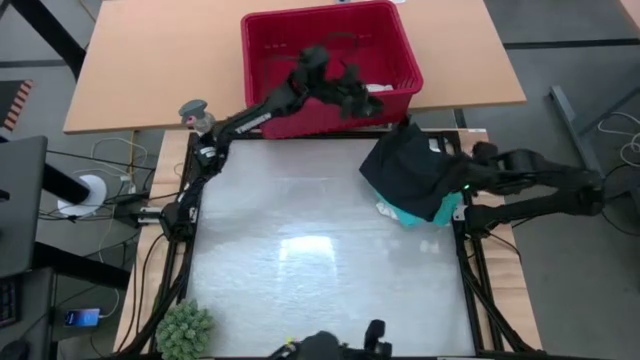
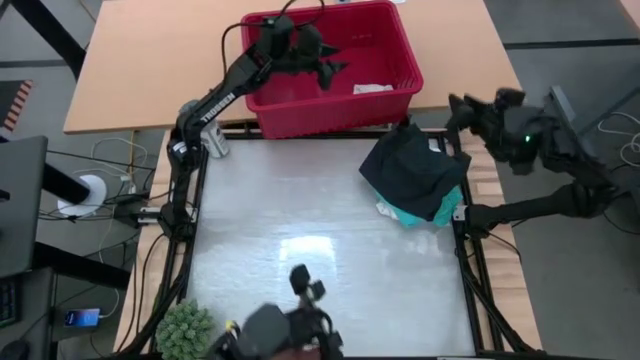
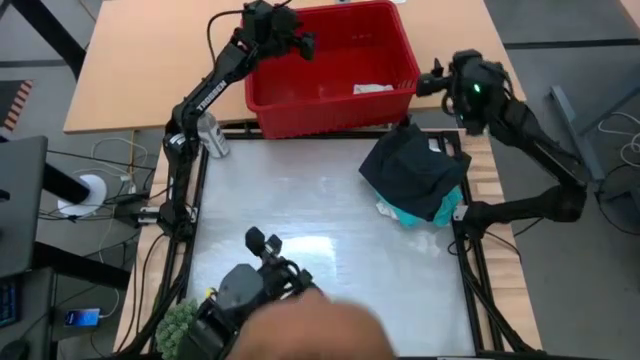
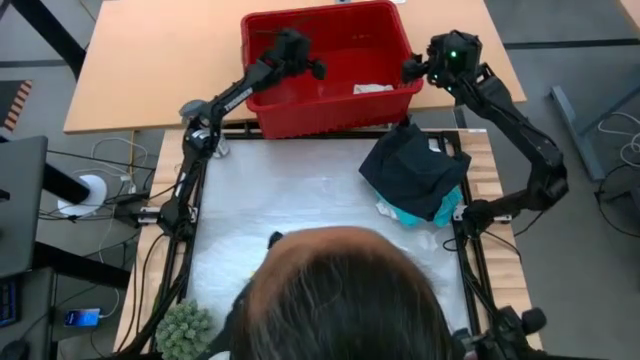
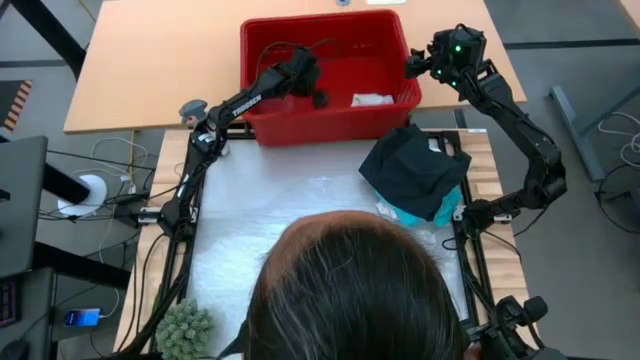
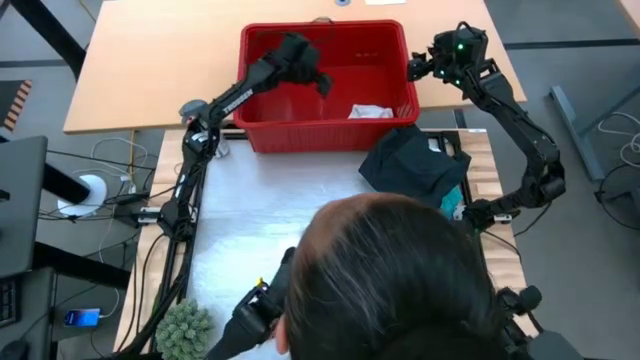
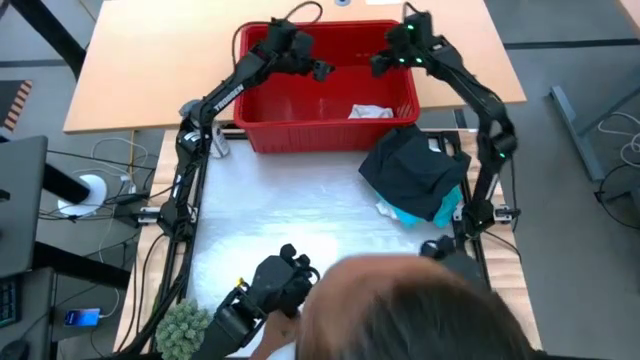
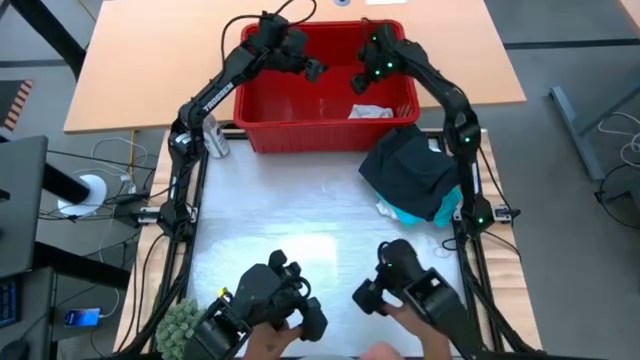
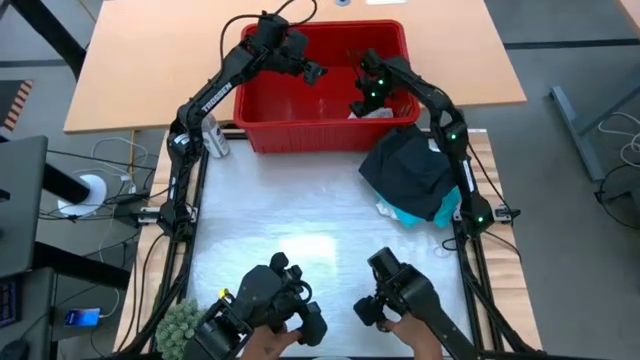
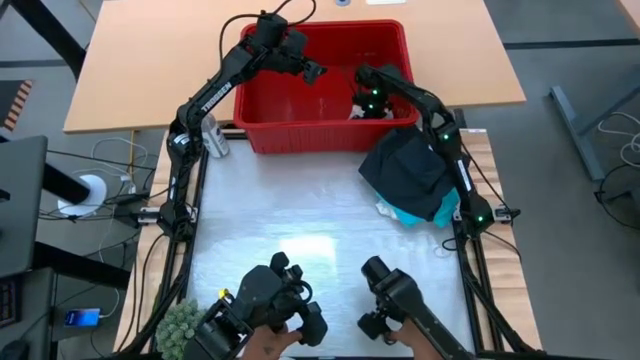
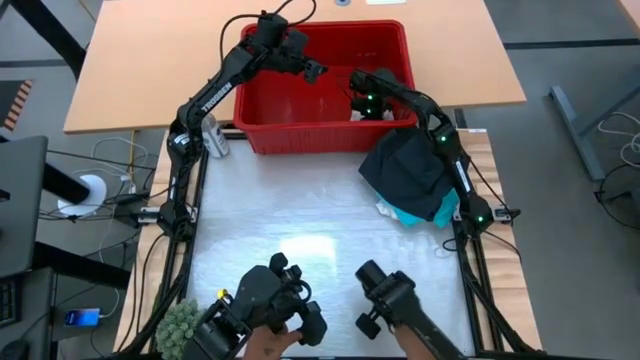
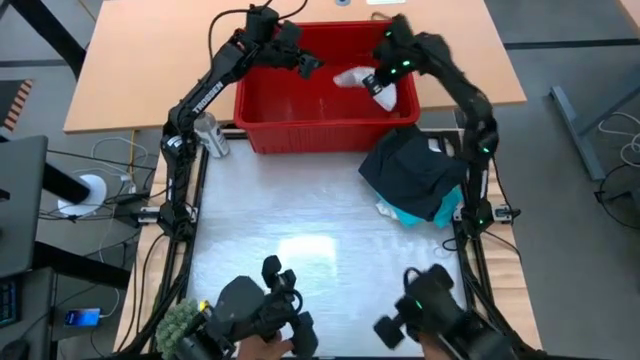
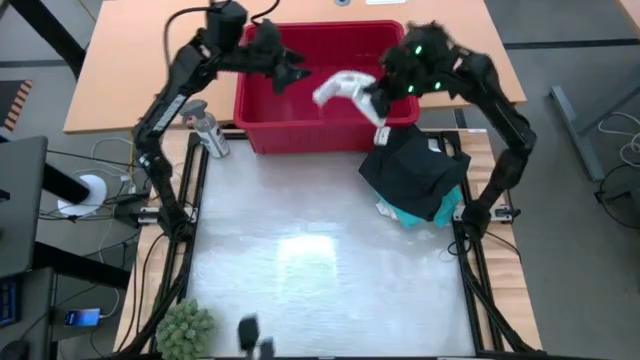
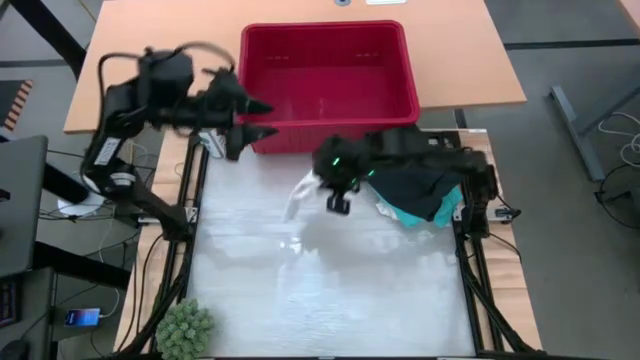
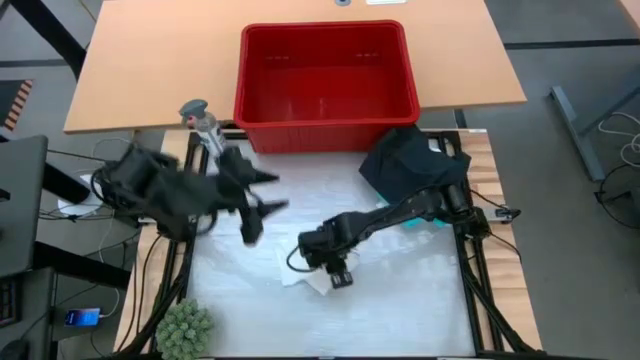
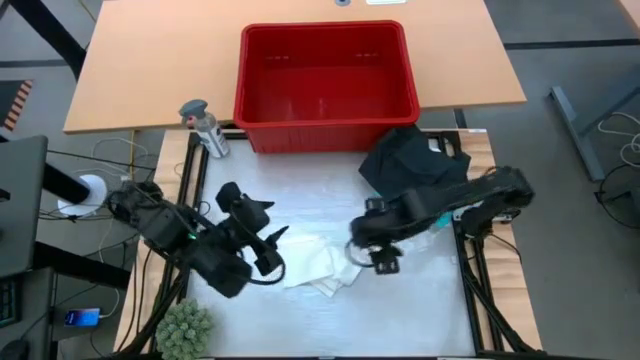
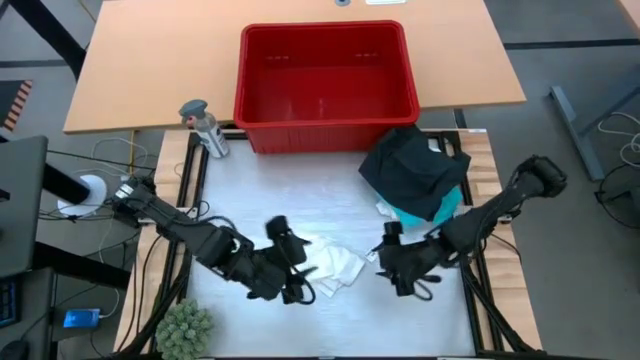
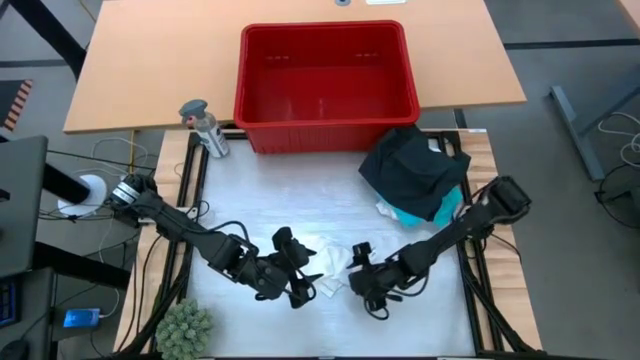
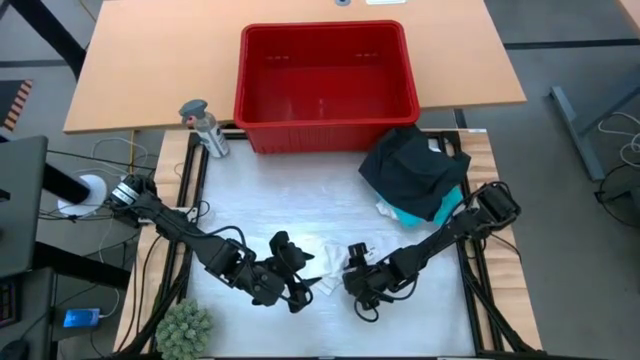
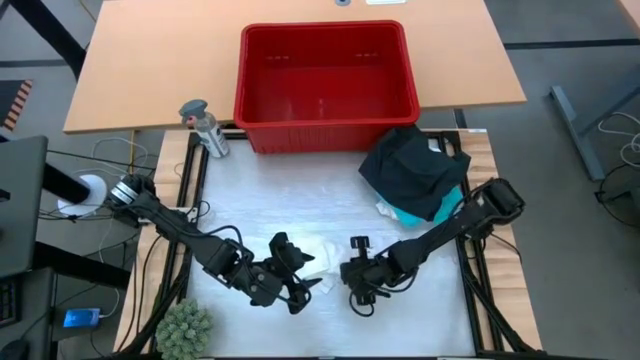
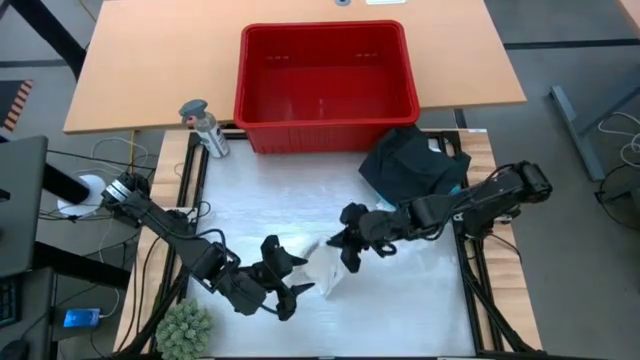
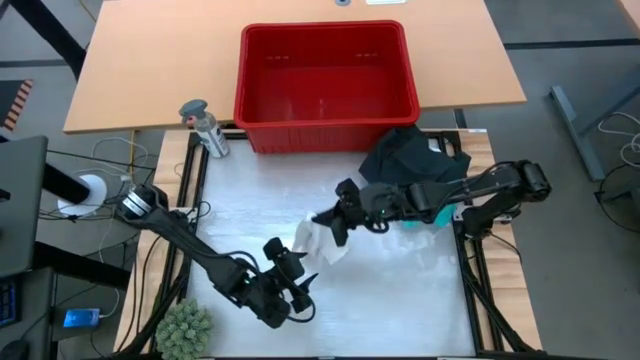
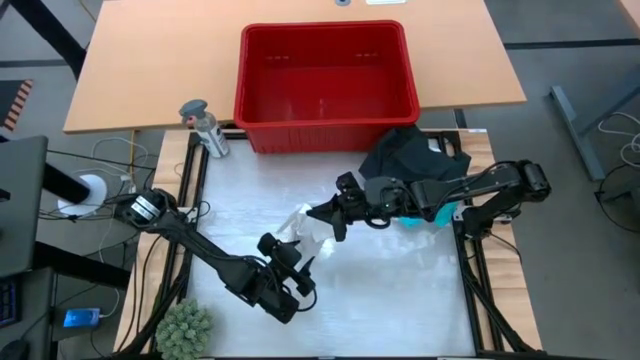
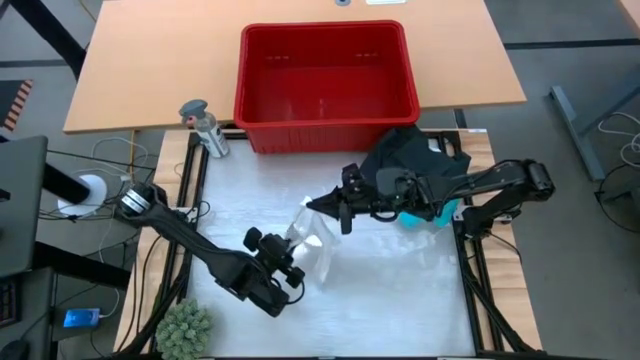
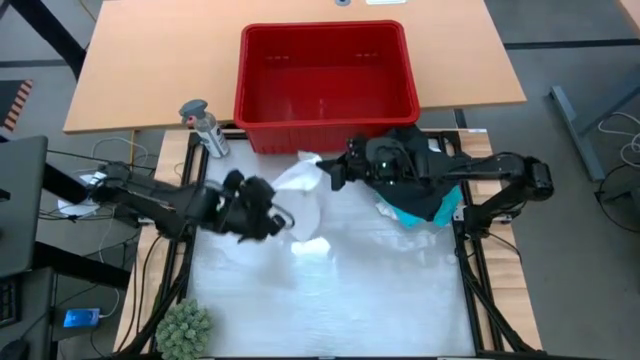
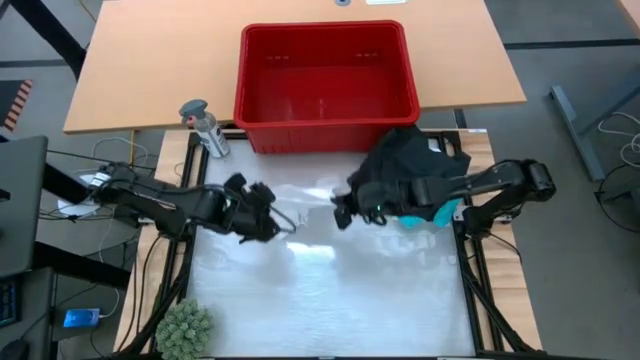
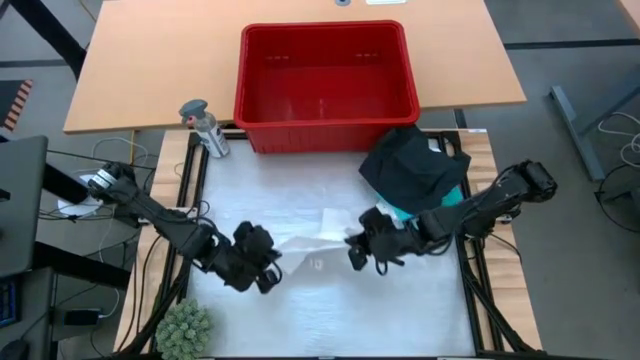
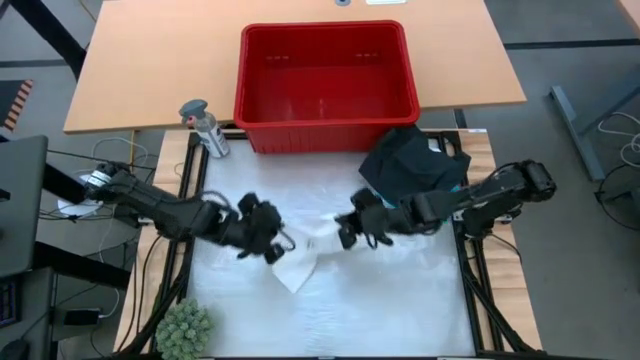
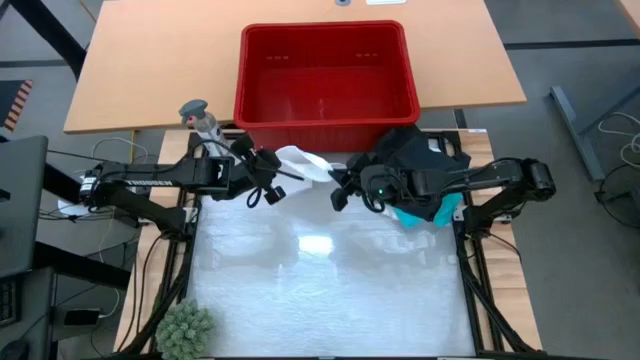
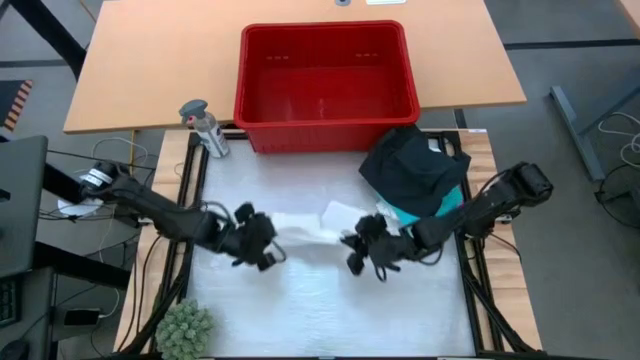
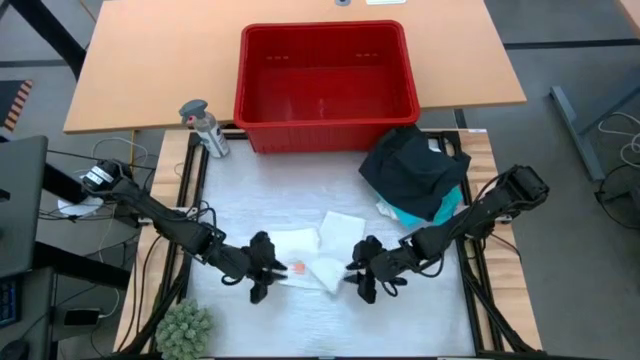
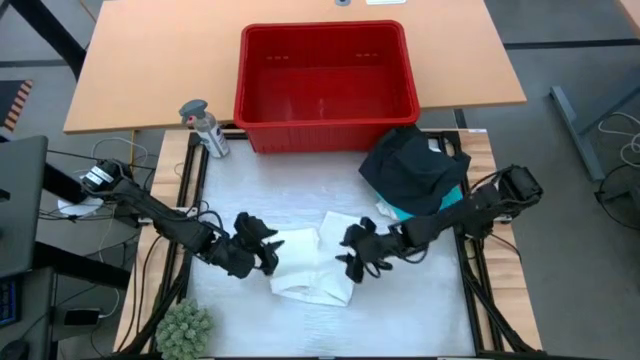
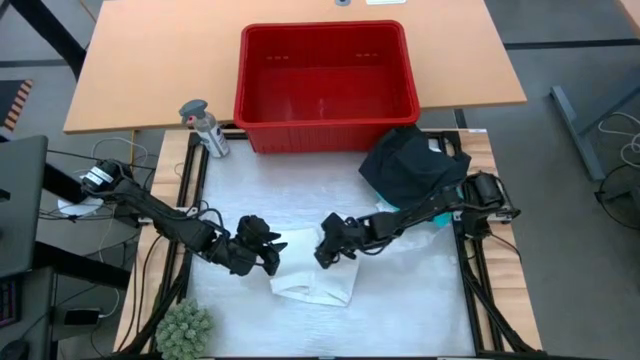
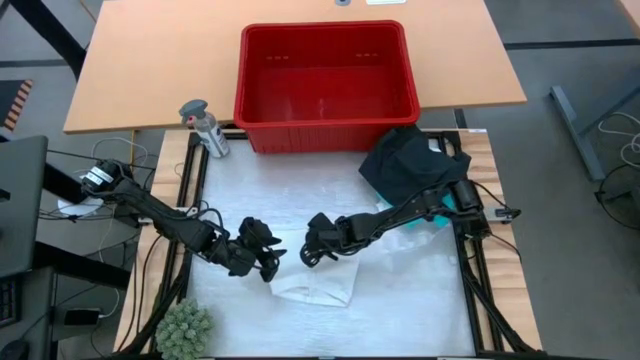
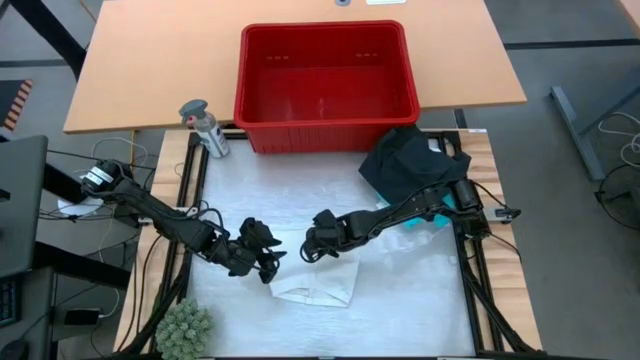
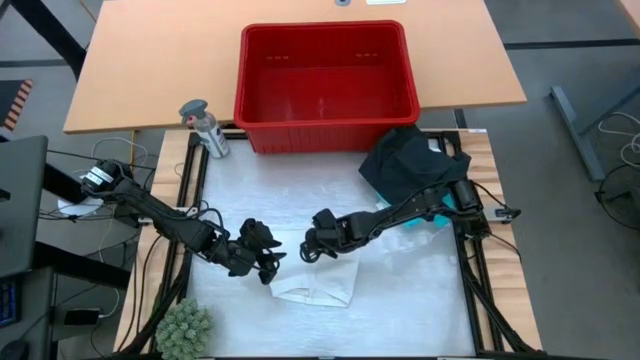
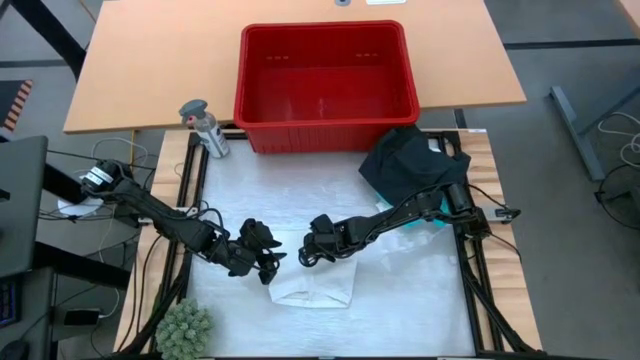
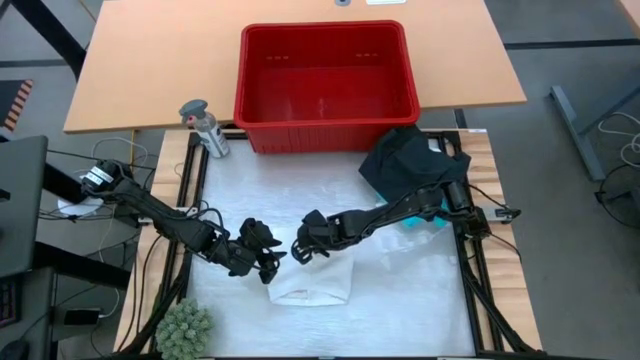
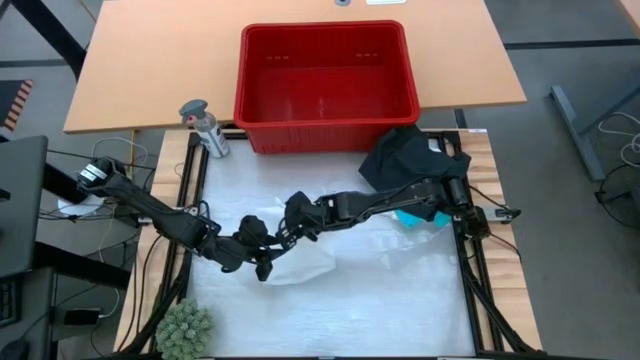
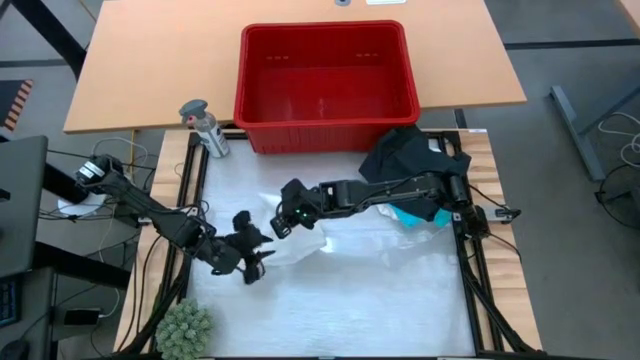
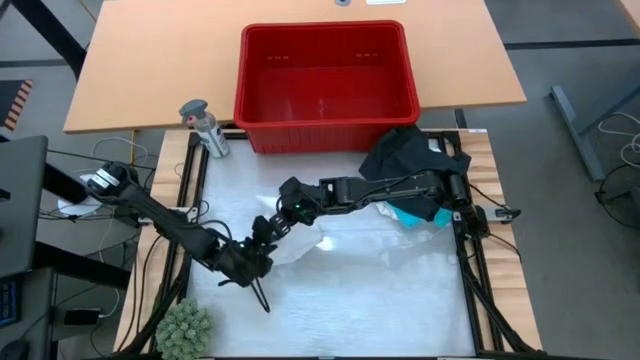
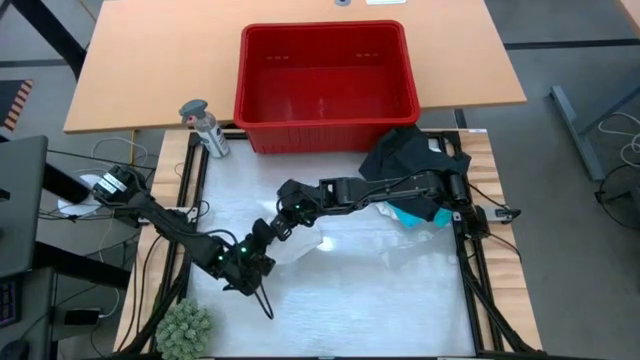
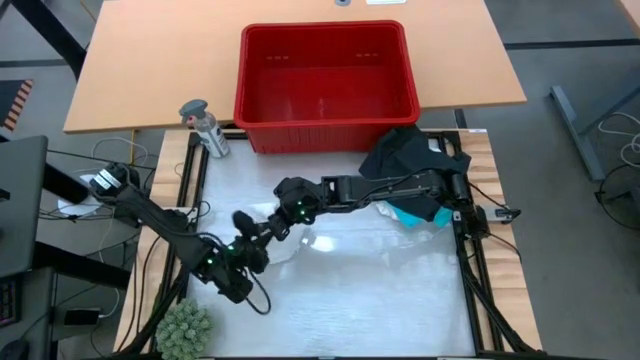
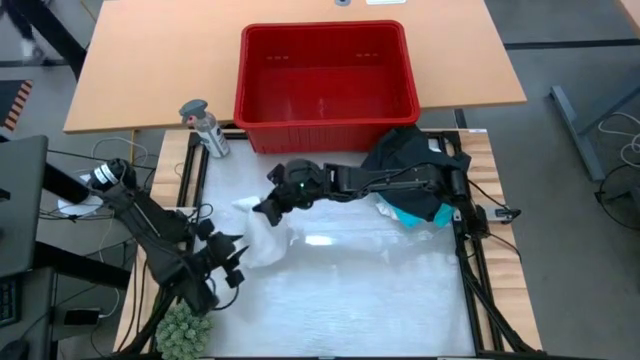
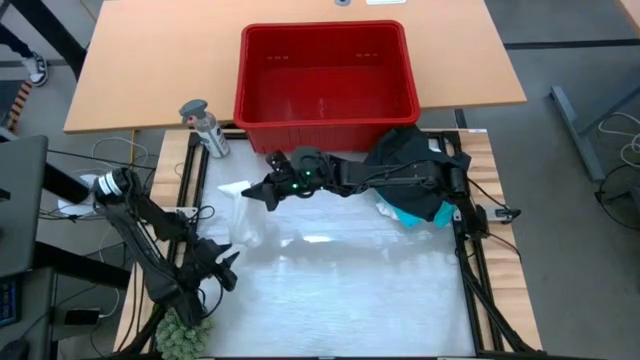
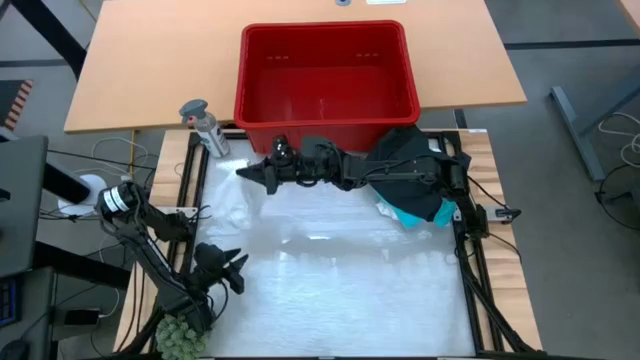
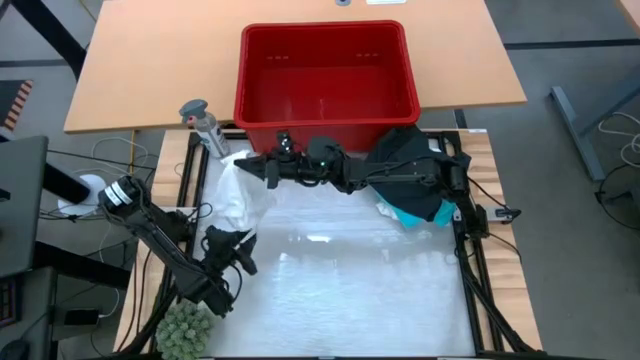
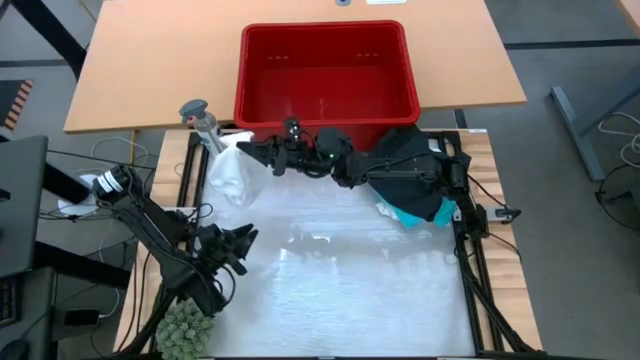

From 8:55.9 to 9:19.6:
Task: Fold Laundry from Bin
Fold the white underwear
